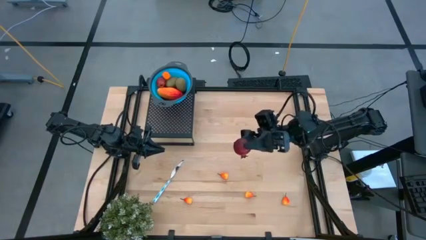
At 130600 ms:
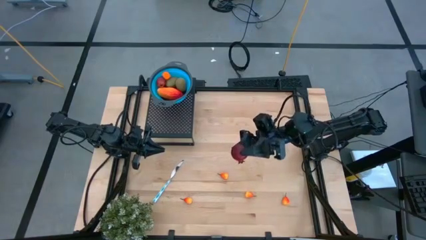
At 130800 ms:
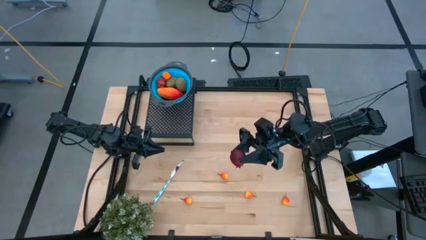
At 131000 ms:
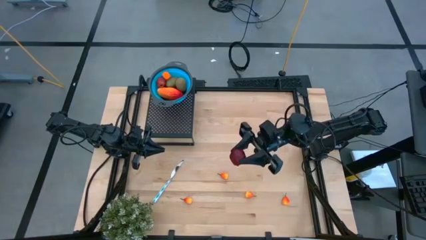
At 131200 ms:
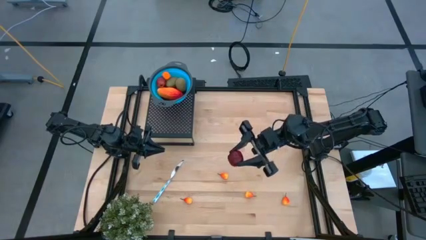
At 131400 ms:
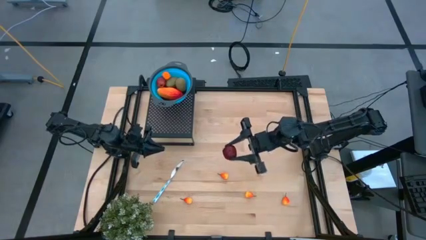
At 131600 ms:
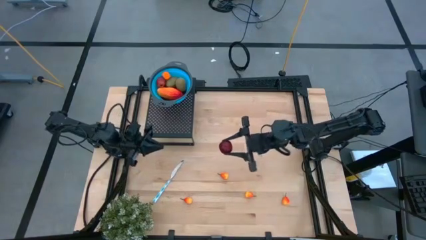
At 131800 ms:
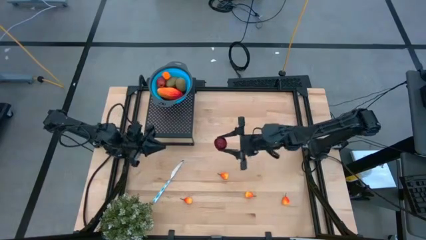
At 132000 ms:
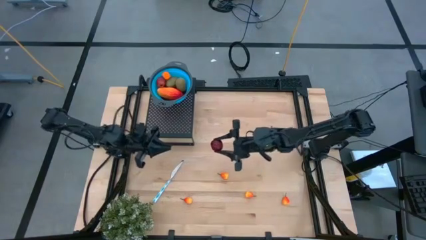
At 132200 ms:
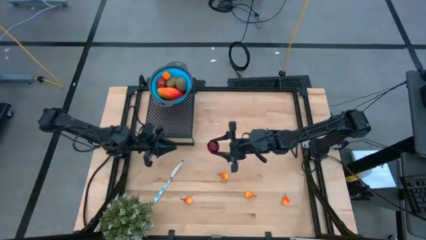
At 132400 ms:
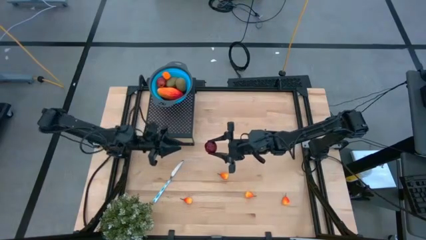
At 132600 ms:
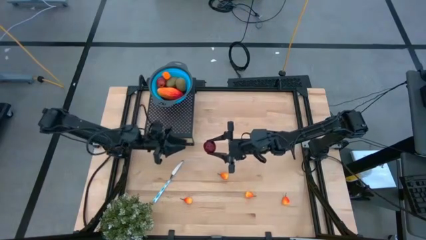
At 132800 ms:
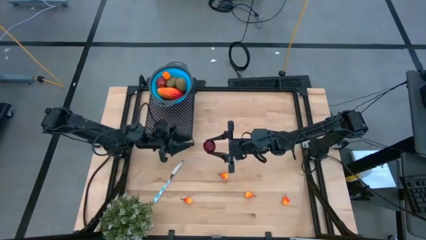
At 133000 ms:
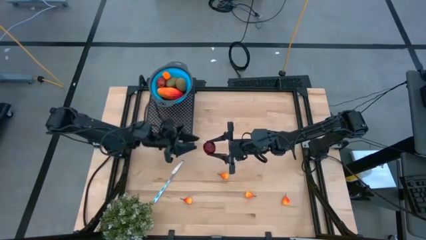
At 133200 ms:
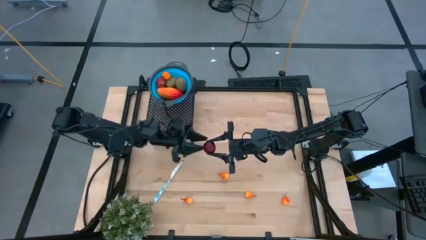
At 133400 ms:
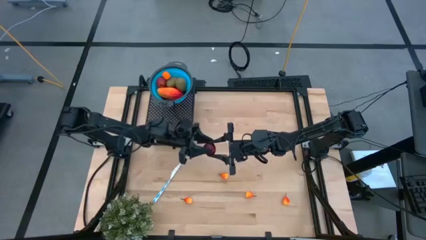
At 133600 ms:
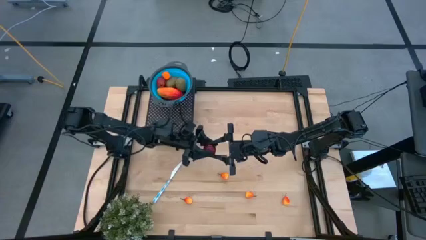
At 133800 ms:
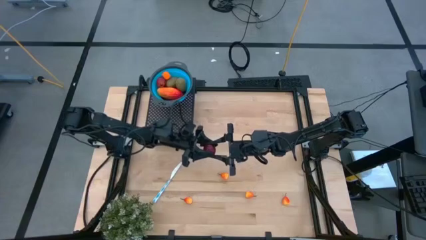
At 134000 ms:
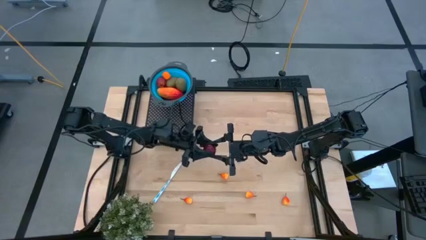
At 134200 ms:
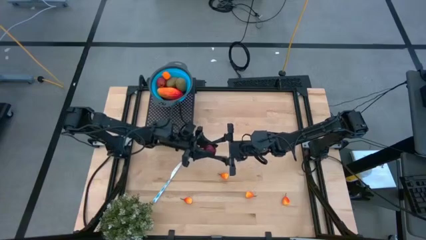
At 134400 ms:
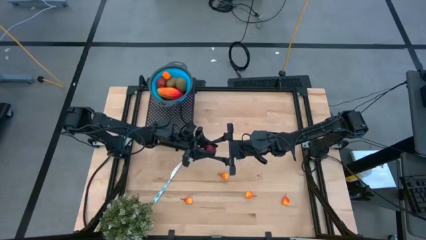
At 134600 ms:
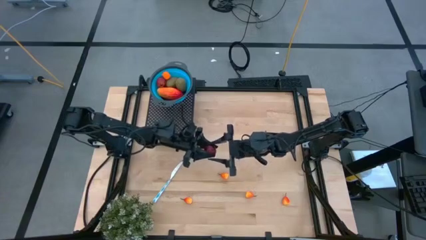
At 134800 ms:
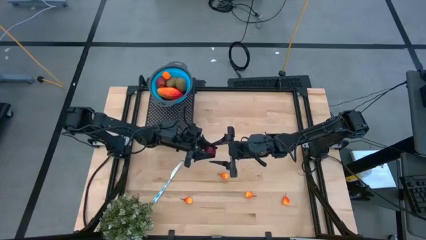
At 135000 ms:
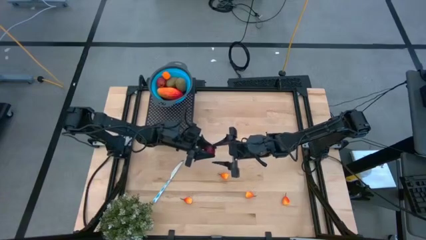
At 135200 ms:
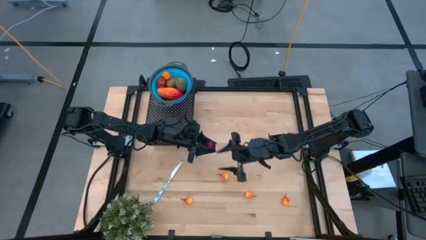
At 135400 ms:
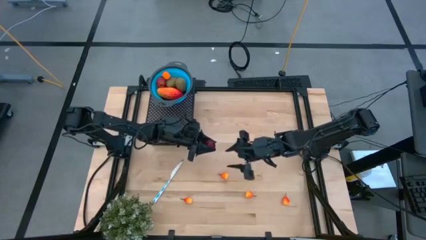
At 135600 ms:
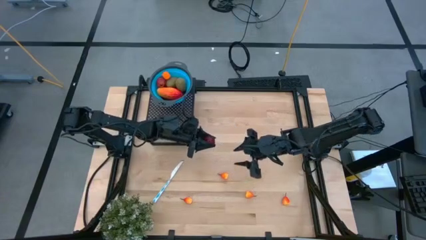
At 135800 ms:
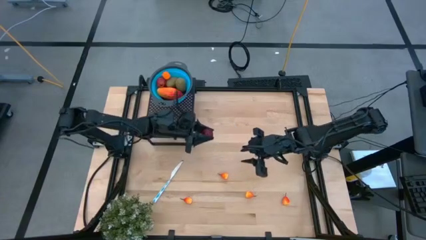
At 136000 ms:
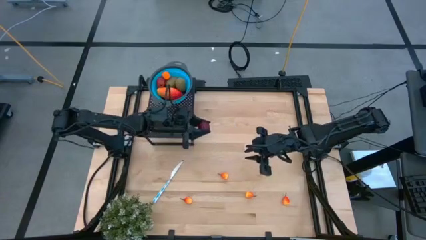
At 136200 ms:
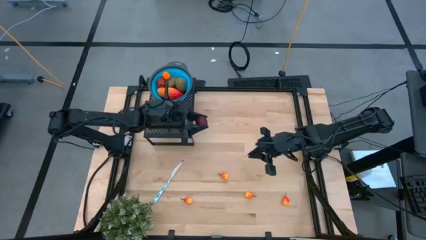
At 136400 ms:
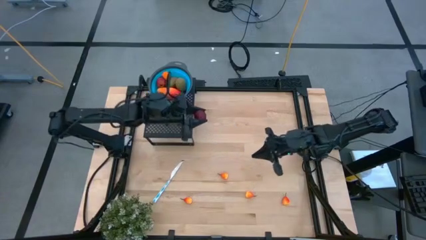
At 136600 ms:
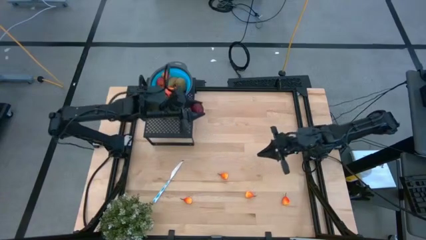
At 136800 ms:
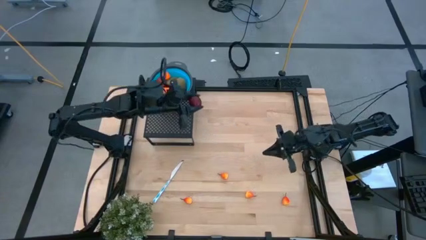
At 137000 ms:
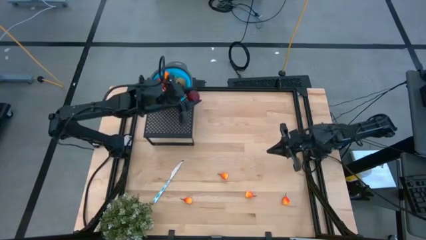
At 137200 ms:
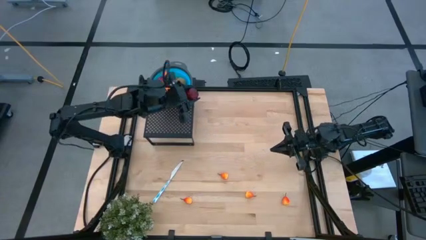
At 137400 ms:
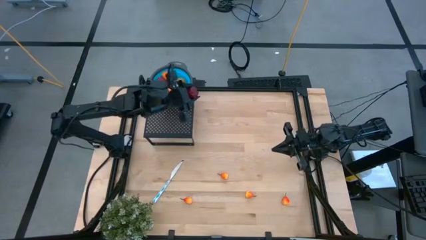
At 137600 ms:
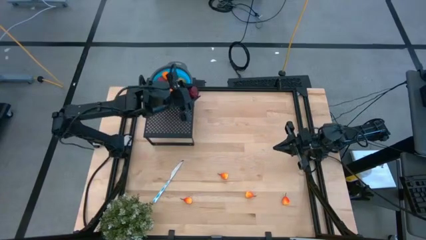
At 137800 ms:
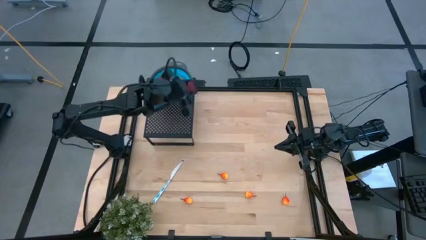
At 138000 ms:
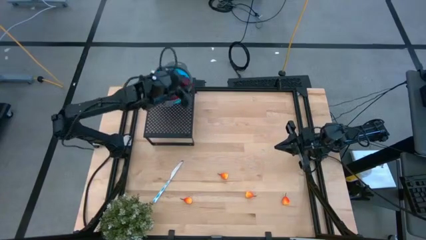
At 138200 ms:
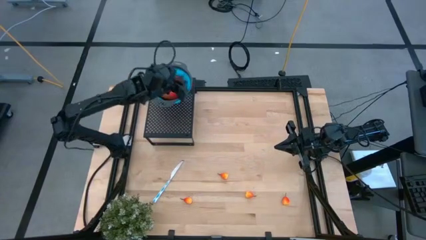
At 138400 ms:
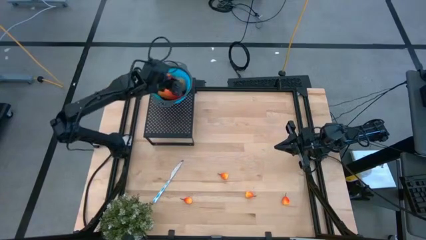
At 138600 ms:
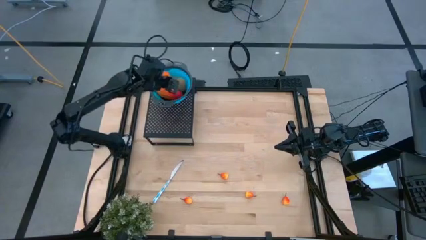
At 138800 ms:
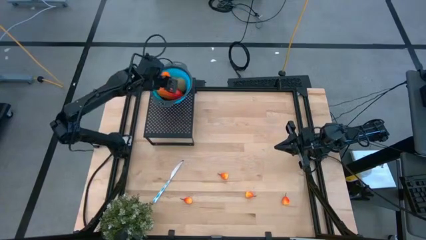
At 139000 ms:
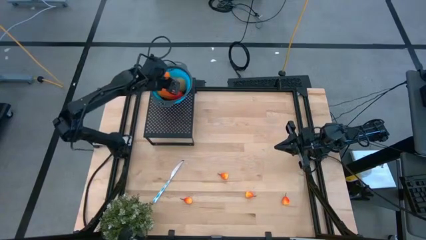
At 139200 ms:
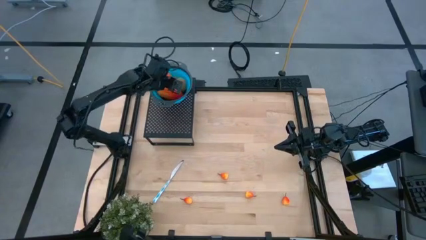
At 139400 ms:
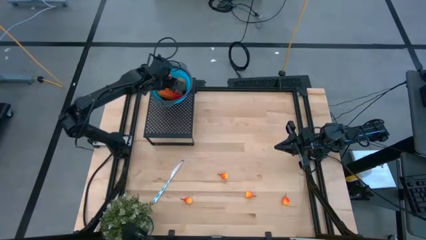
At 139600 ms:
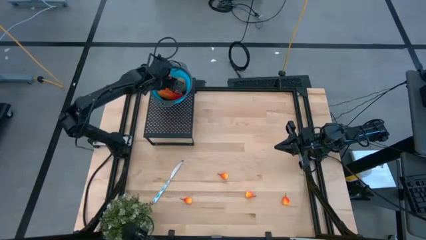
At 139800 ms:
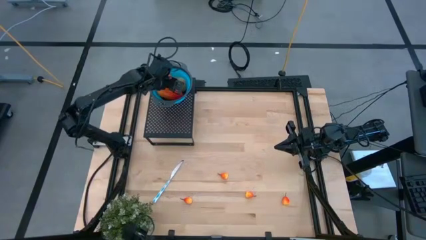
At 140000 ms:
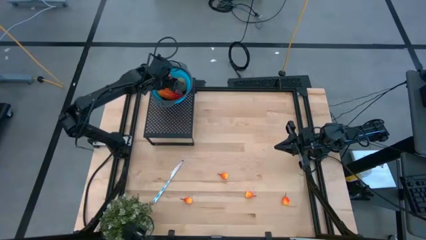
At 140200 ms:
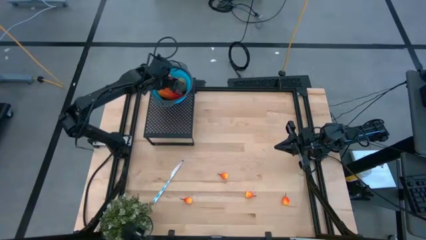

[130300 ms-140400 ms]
Task: Pick & Place Fruit
Put the red pomegranate into the blue strainer bowl on the shelf

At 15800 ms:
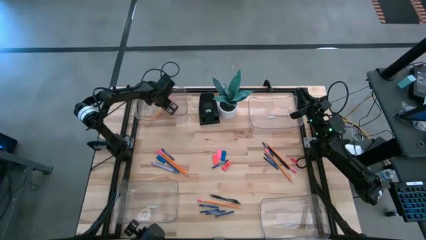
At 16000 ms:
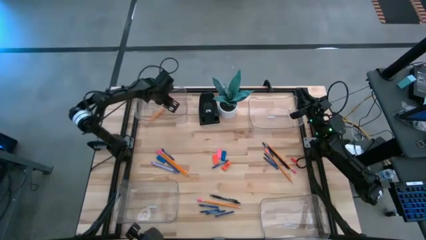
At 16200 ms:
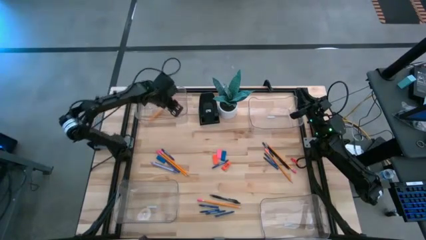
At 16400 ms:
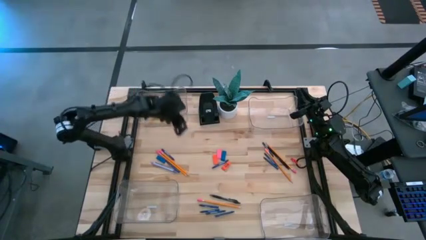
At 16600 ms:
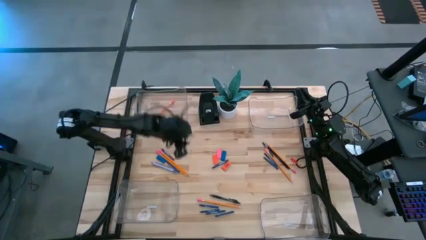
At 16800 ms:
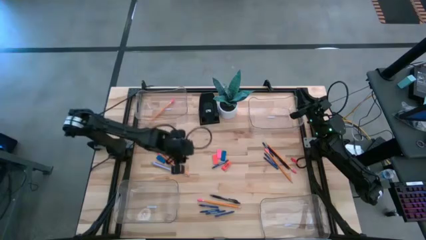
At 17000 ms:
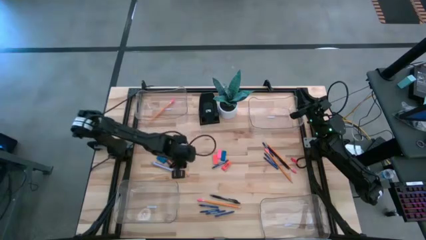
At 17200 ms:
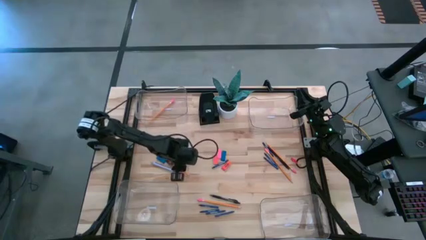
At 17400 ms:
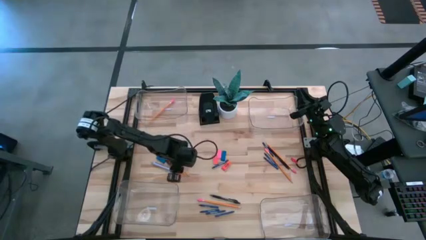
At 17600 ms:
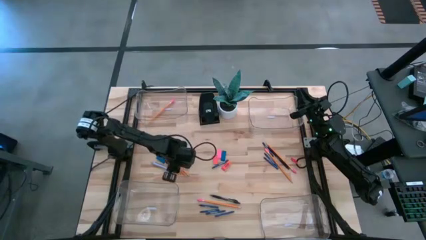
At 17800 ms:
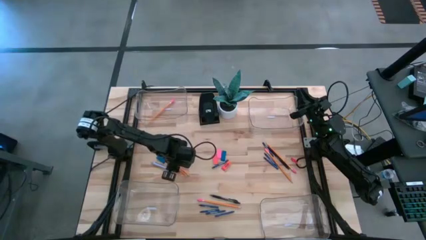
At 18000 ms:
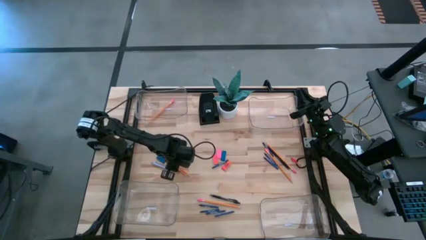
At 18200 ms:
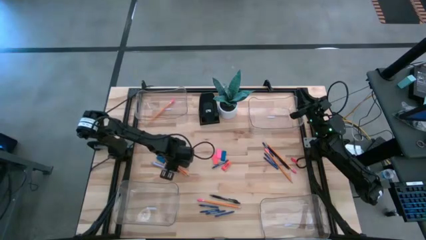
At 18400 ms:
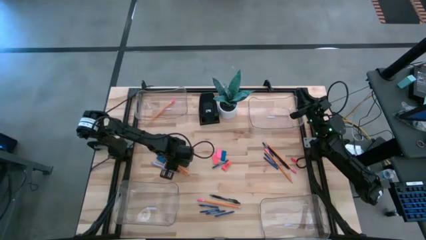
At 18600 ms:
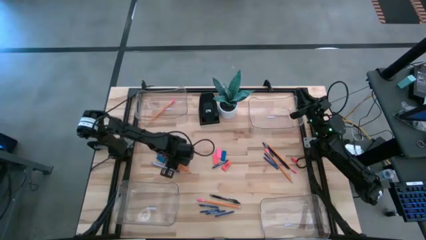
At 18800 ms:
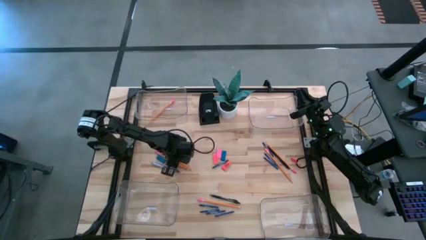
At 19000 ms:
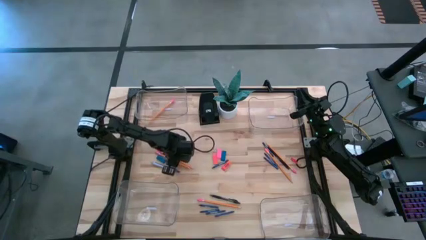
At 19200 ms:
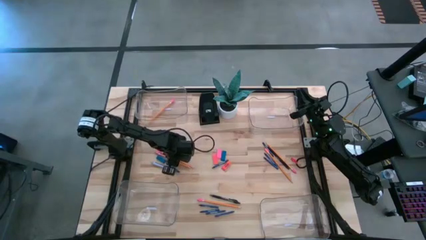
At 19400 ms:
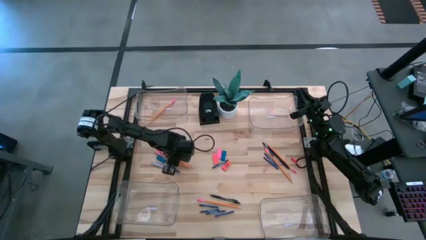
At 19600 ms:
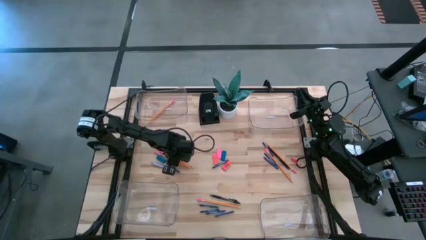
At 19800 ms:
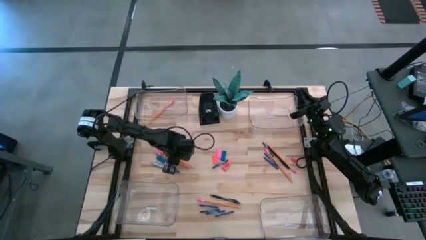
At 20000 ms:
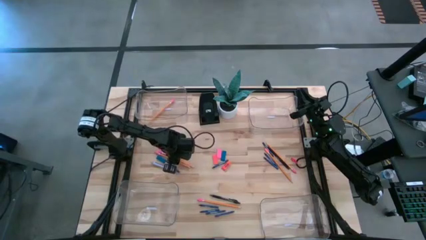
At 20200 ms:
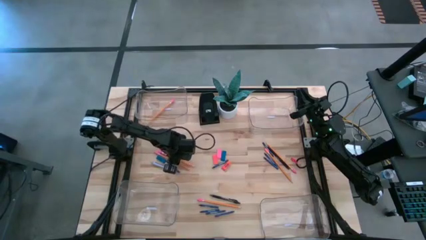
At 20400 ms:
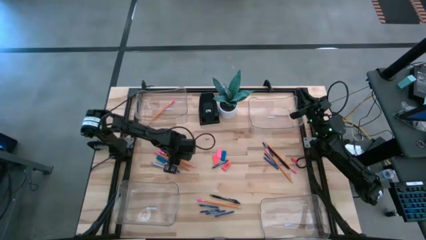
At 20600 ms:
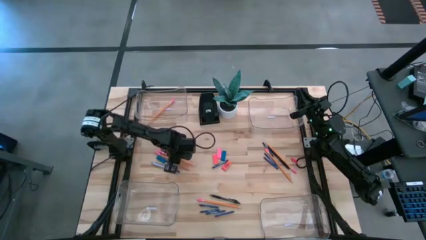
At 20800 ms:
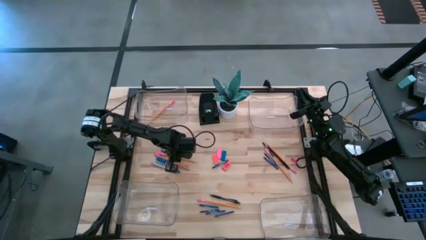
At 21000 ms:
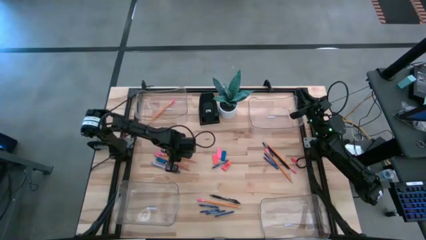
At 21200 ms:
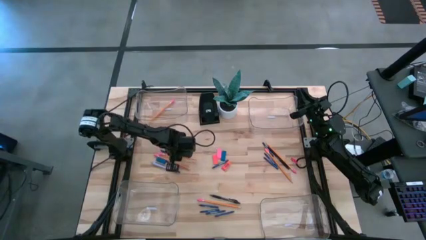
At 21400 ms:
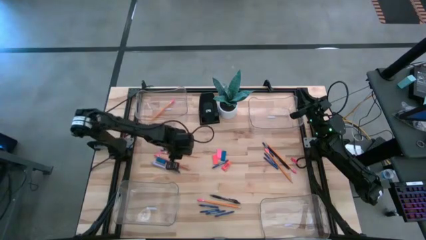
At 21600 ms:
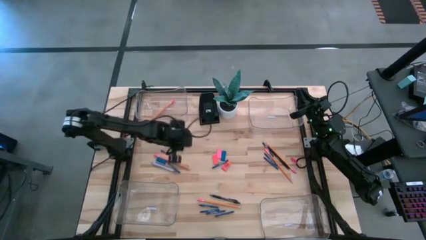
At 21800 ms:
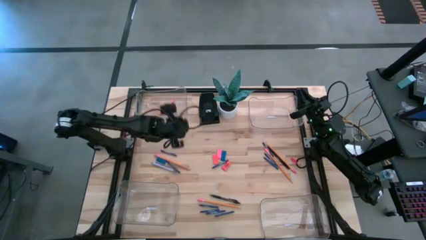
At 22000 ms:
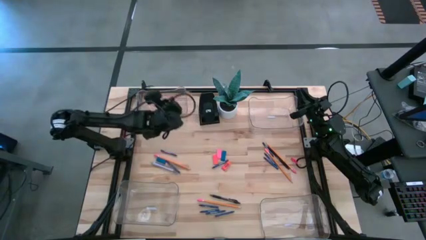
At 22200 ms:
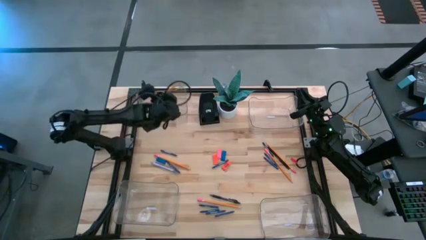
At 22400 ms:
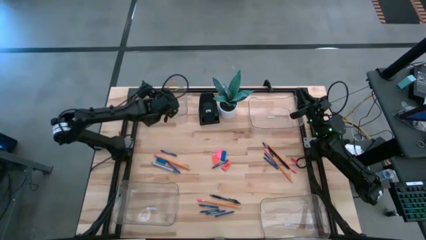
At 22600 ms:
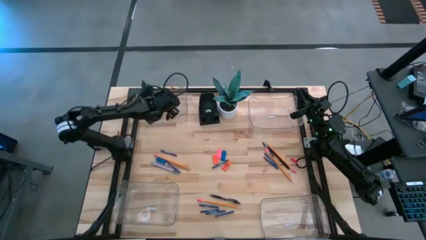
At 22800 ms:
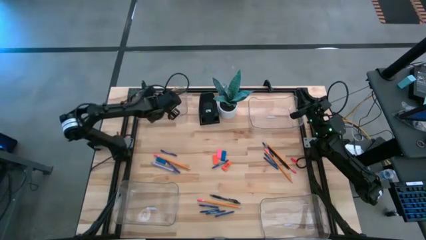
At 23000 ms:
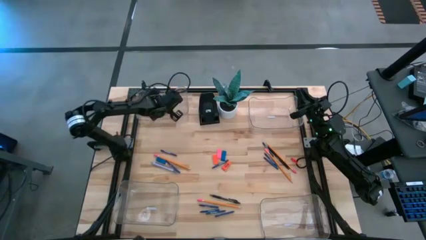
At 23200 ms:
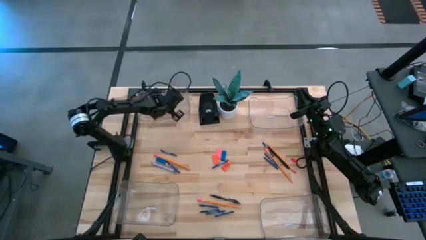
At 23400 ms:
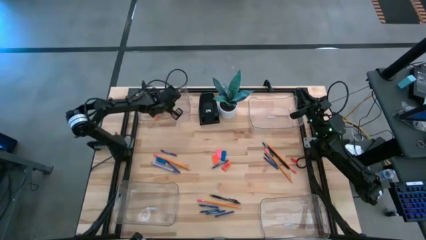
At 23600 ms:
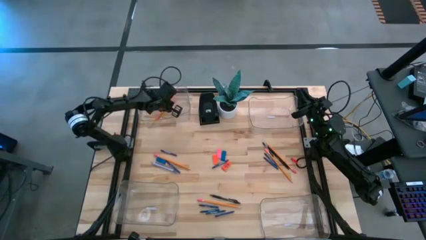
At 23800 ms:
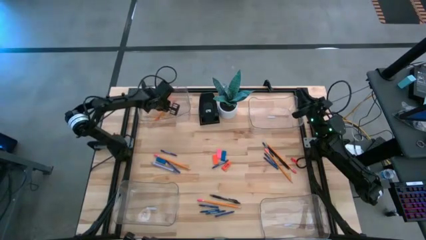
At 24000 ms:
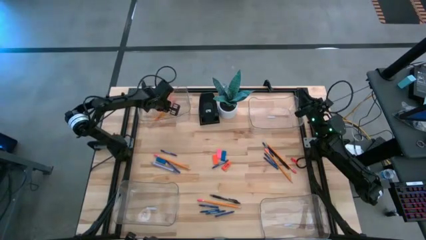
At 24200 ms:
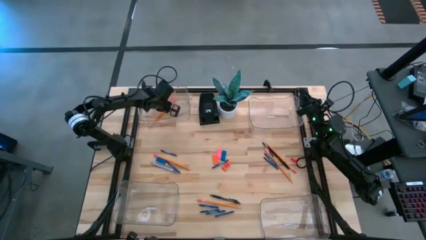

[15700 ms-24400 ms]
Task: Sort crayons/erasers/pens/pencils in bins
Put the orange pencil into the top left transparent bin
